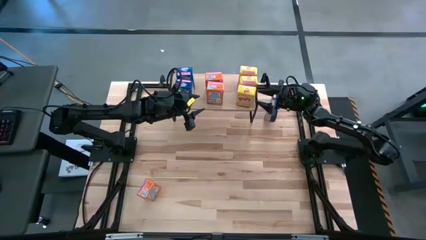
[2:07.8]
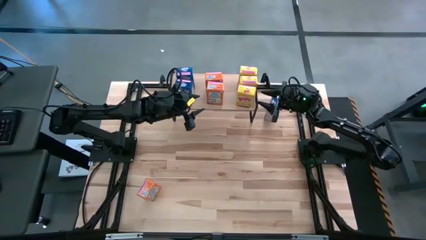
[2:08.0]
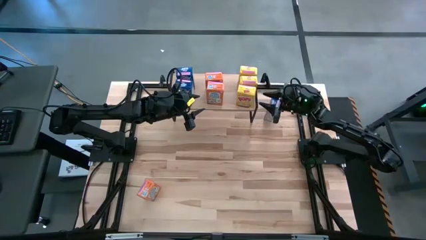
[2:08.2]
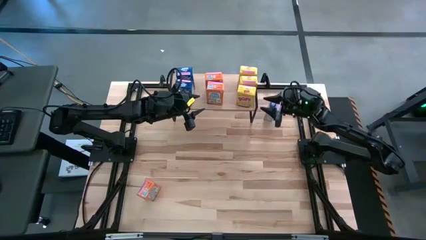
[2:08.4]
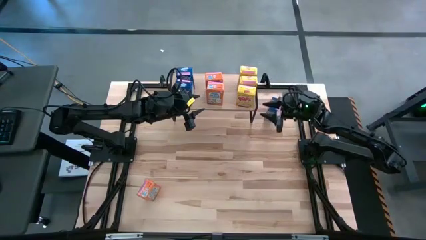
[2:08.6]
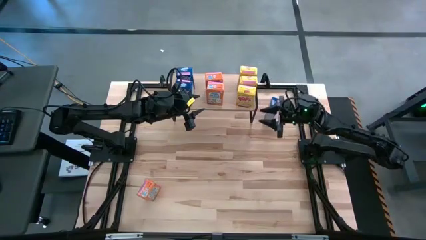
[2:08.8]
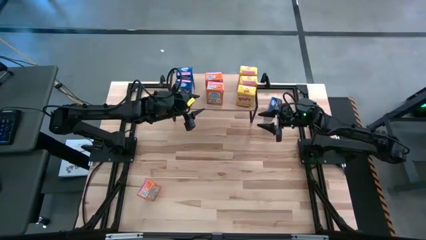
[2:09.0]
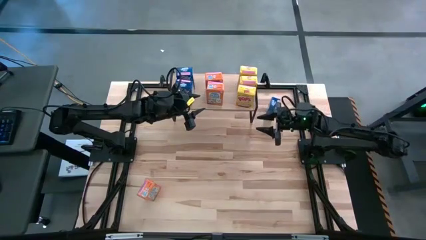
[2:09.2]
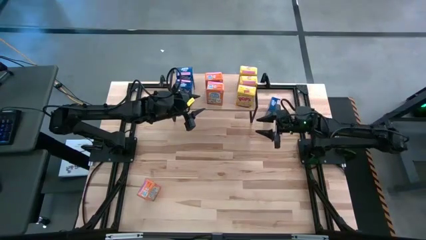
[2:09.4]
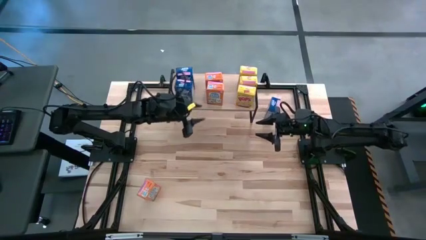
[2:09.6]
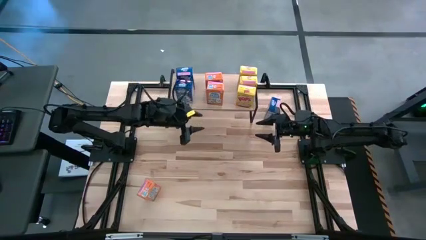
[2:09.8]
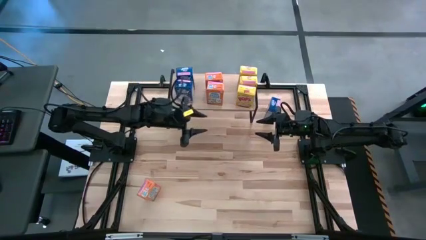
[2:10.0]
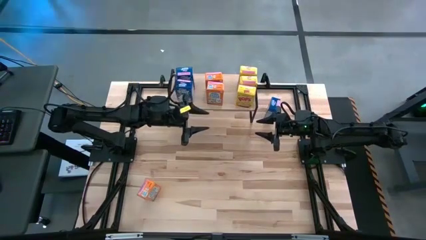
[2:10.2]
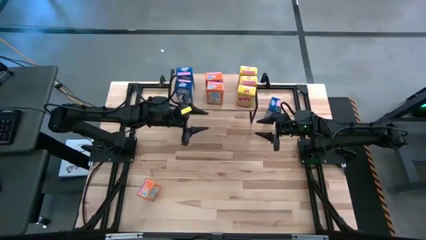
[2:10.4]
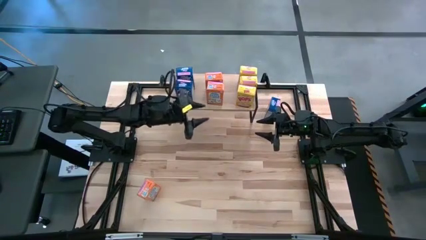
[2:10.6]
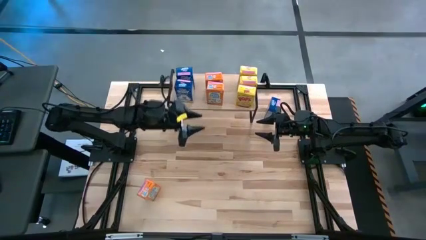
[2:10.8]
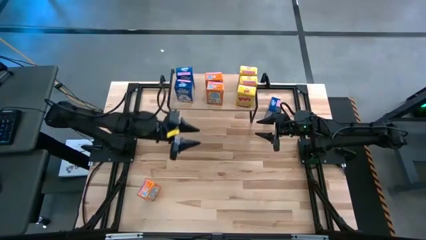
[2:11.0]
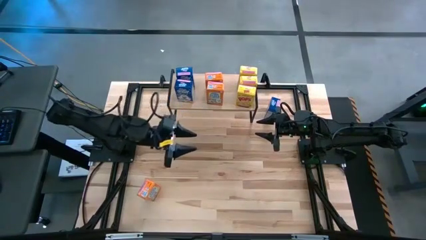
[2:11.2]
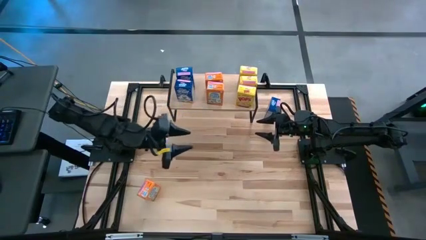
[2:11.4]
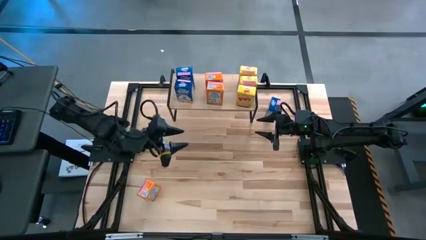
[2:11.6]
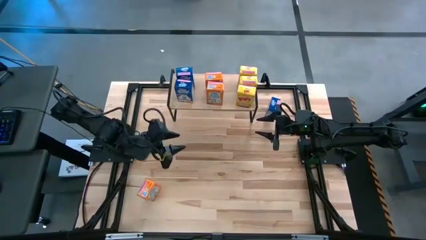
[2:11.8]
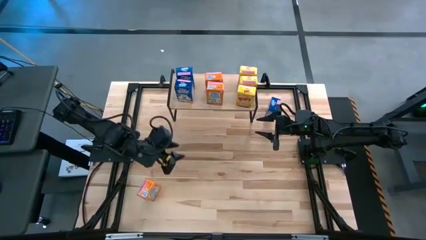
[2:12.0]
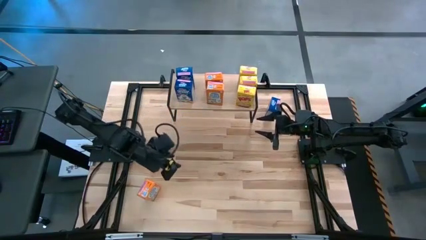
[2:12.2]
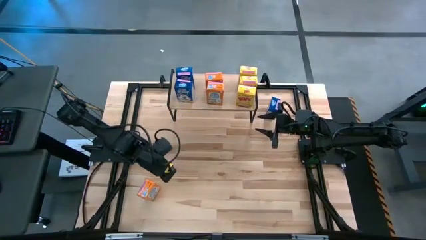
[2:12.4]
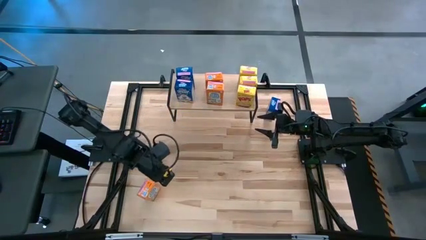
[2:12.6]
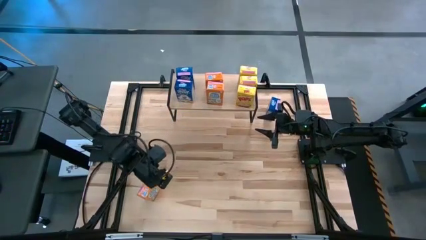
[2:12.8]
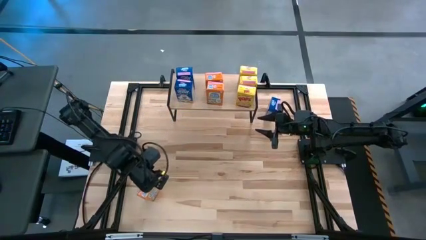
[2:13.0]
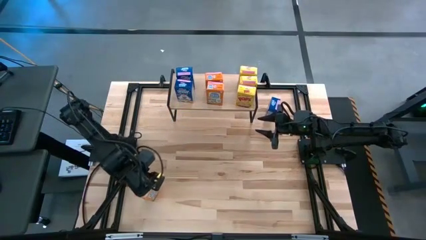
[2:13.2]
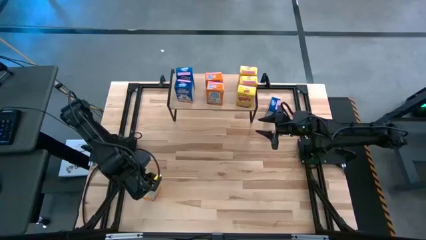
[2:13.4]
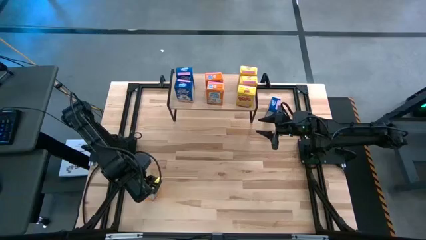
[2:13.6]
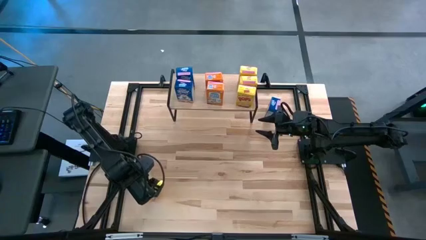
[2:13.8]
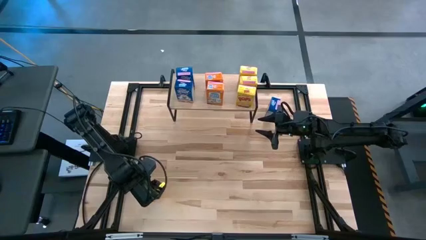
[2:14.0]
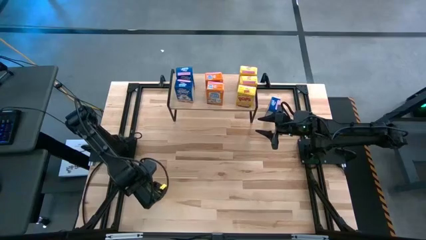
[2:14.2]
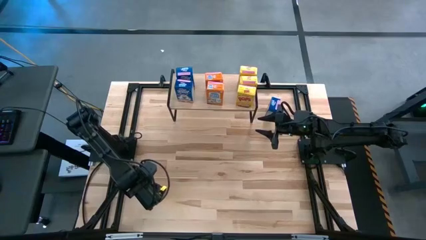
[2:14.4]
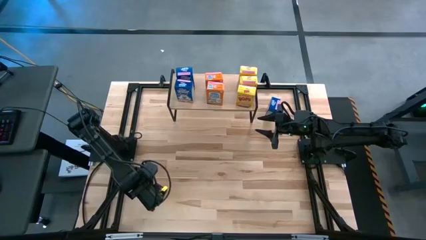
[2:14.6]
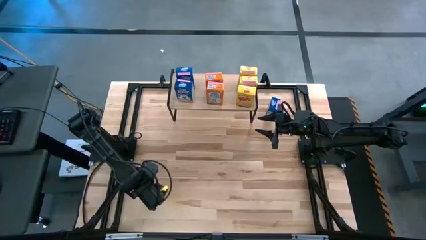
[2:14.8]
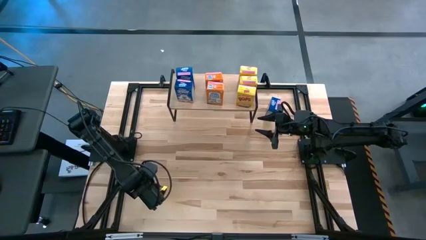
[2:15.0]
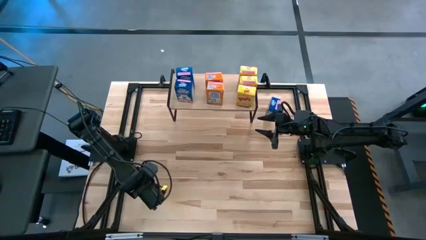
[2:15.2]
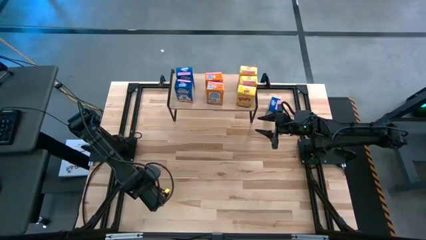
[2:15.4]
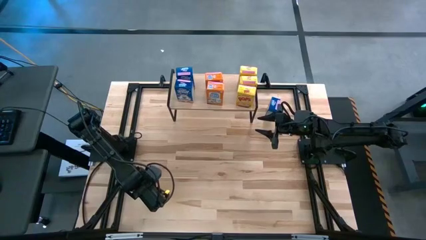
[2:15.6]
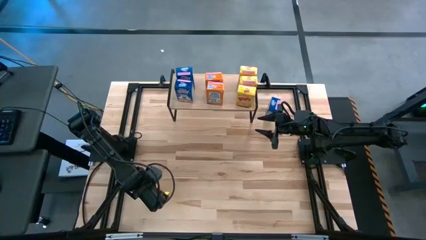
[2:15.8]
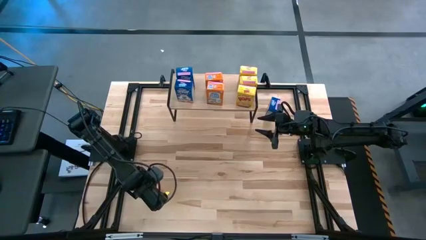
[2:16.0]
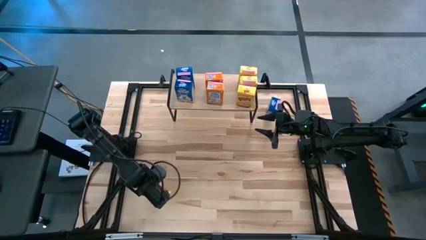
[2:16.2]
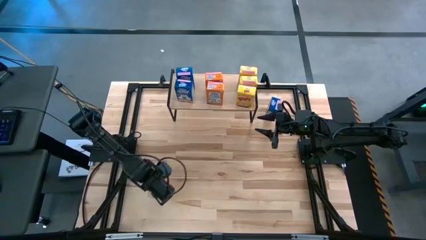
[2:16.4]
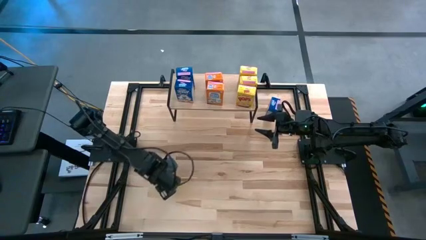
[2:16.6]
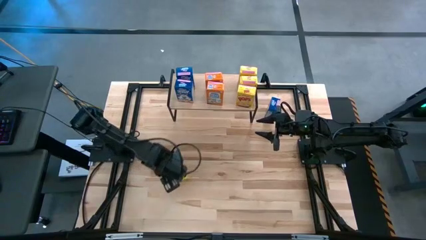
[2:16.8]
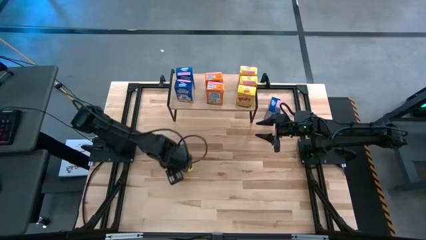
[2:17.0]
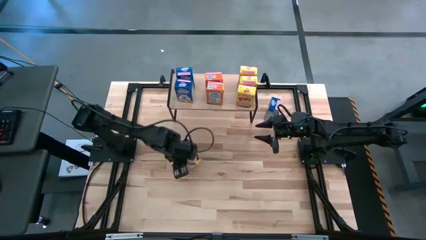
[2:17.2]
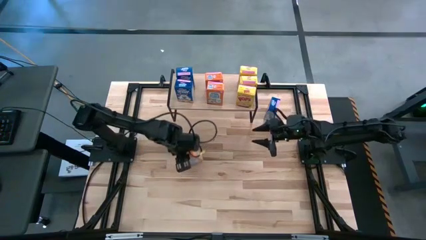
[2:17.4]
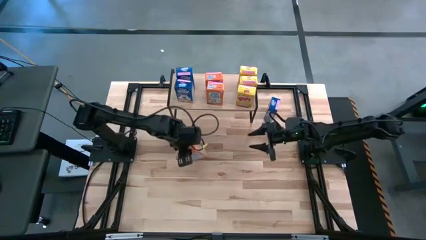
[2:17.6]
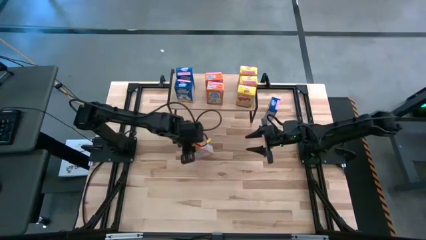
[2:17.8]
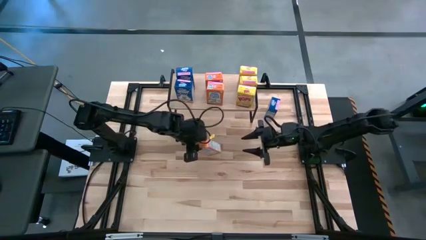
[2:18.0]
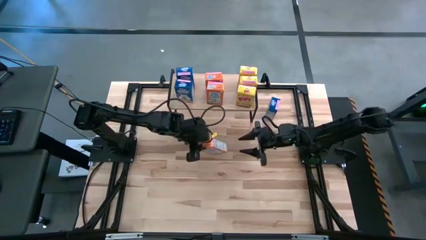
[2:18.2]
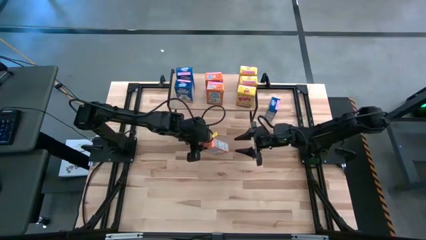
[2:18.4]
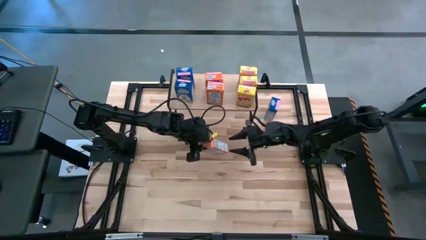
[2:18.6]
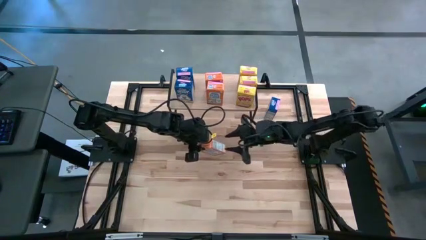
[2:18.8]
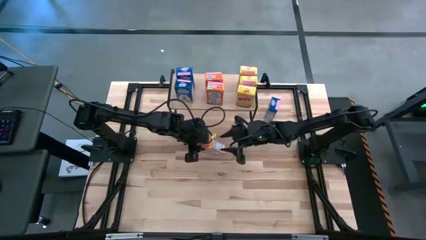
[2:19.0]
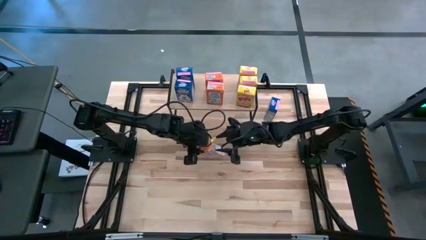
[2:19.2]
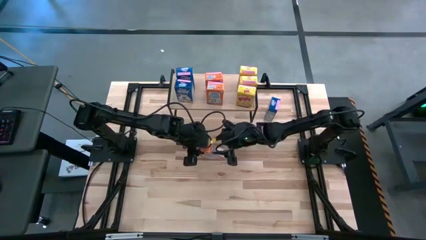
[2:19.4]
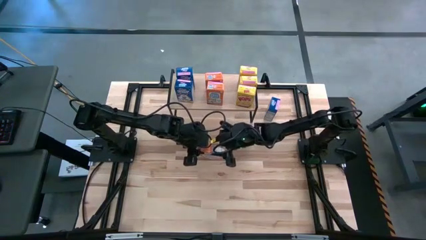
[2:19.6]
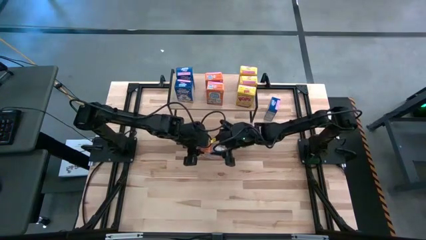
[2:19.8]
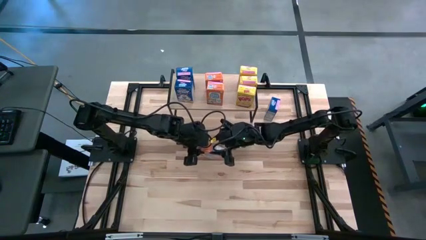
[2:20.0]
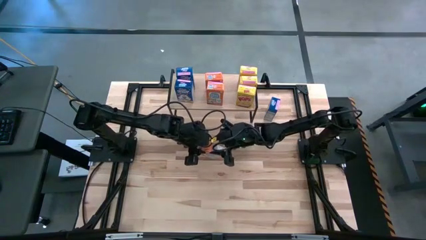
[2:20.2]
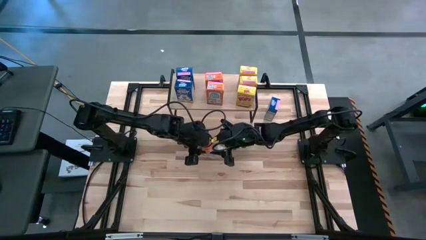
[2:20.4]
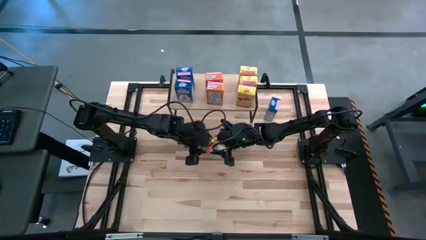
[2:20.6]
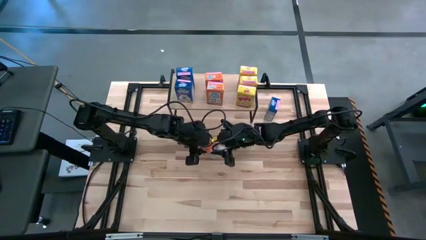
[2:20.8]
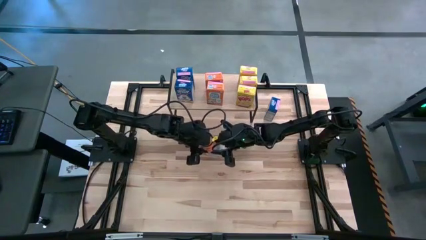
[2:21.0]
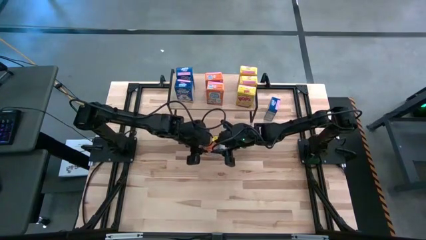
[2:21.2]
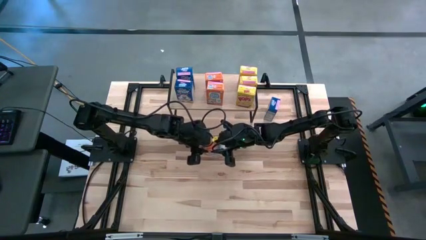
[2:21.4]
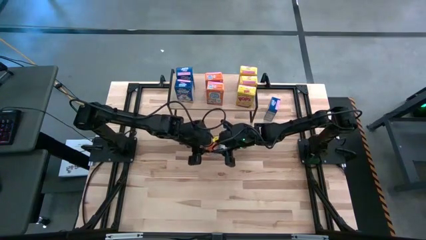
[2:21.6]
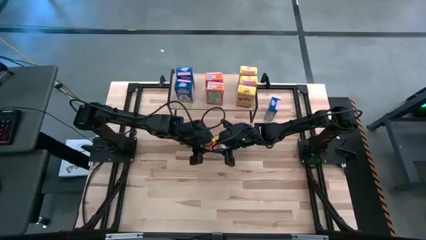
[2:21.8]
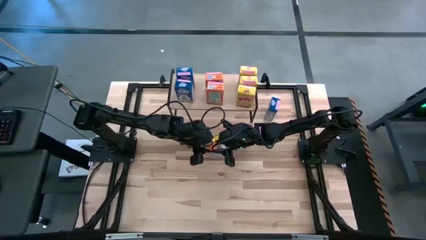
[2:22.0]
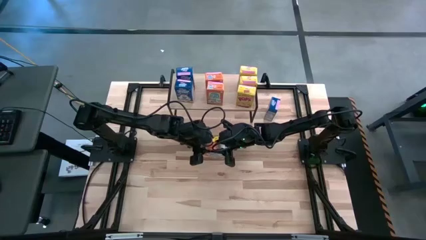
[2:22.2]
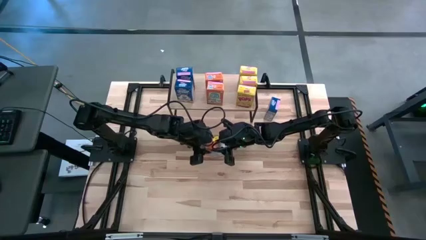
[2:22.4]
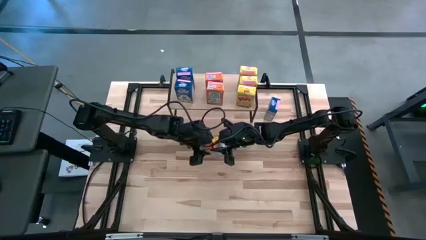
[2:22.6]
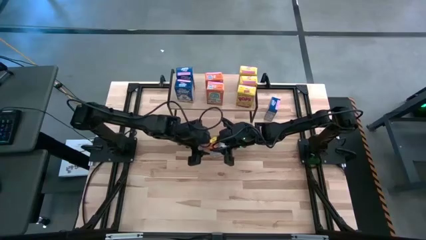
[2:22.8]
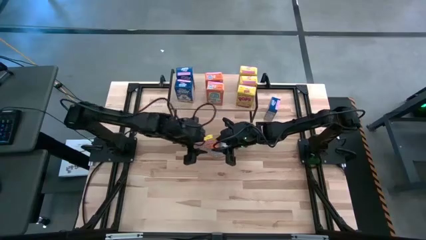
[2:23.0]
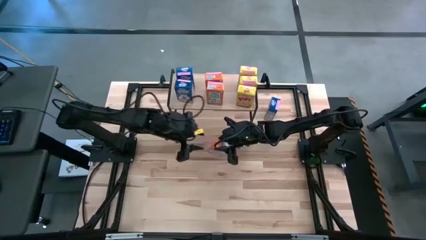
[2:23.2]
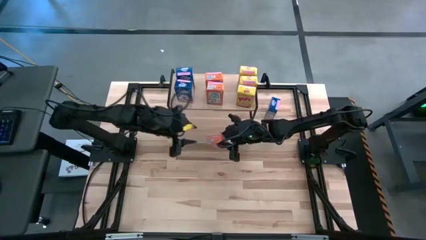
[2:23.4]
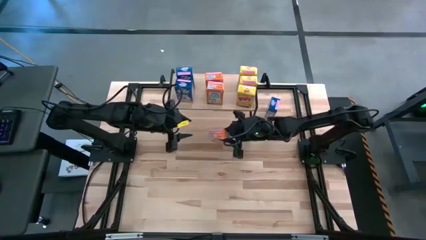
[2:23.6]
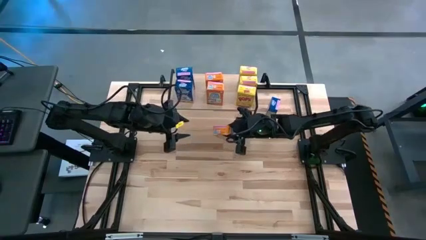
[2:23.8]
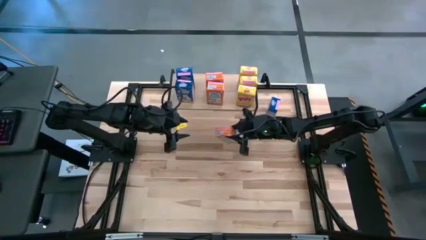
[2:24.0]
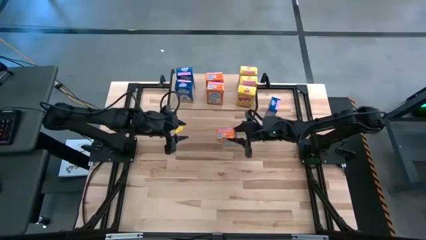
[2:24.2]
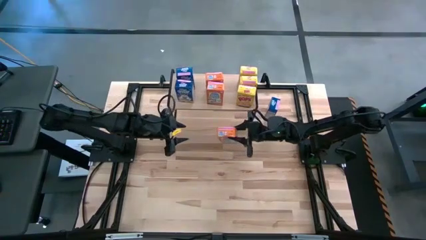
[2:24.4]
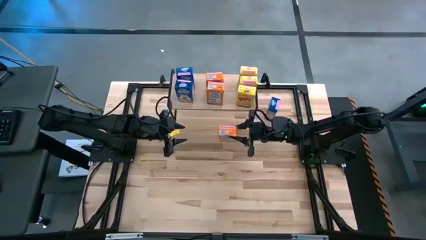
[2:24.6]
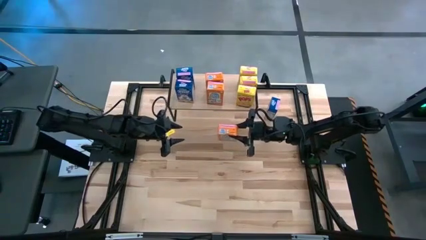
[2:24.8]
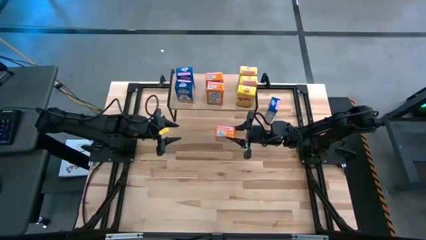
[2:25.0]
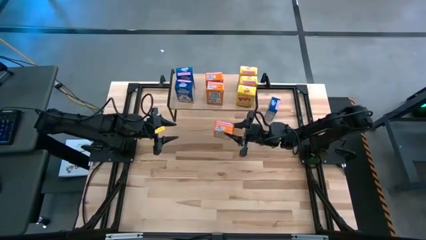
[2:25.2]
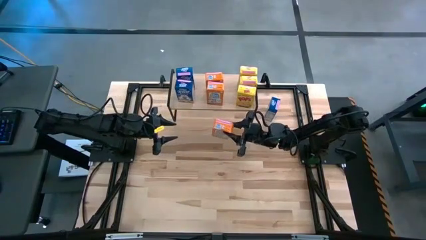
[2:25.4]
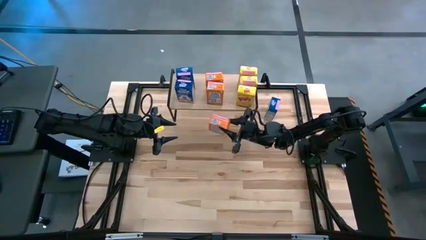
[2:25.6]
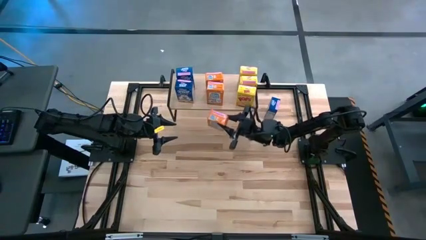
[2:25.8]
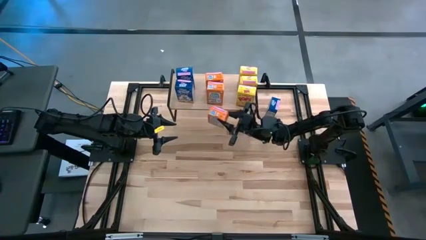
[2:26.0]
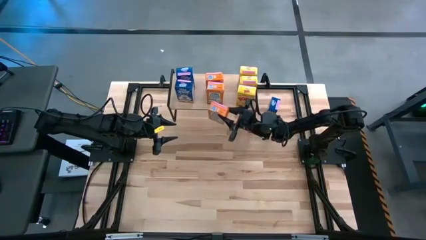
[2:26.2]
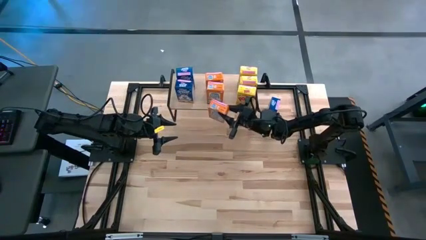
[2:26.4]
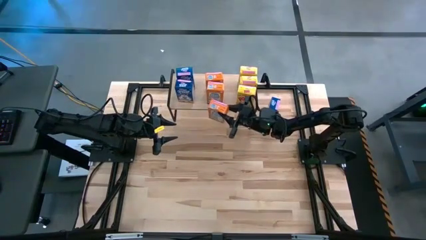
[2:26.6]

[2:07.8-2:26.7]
Task: Stack cereal on shelf
Put the orange cereal box aligned with the other orange cereal boxes on the shelf
